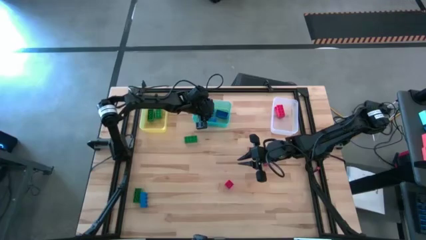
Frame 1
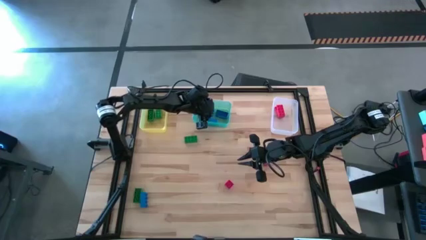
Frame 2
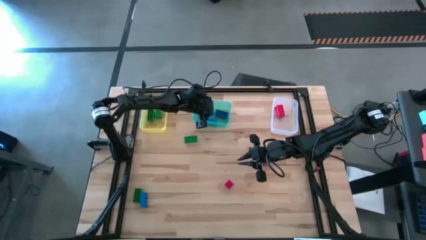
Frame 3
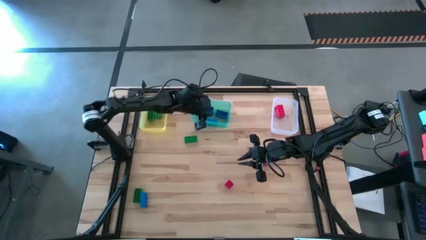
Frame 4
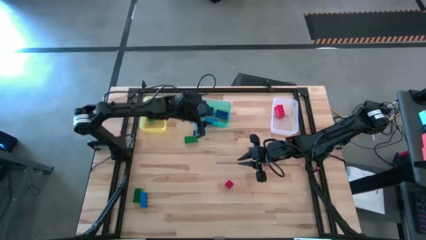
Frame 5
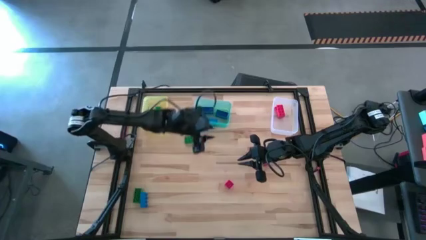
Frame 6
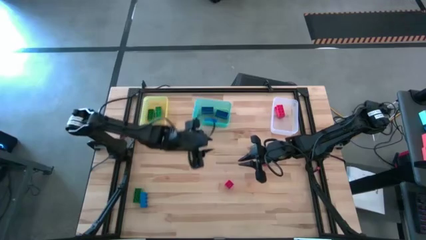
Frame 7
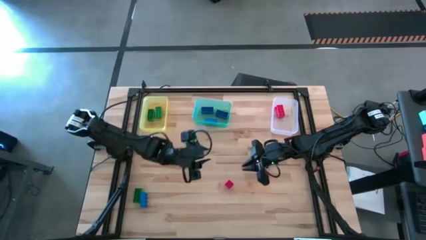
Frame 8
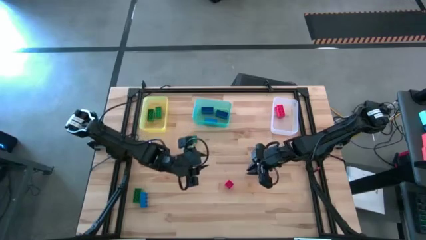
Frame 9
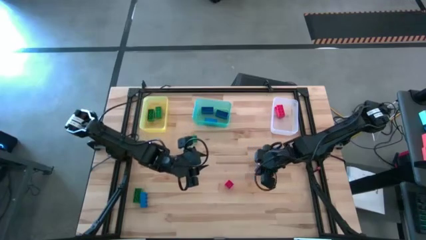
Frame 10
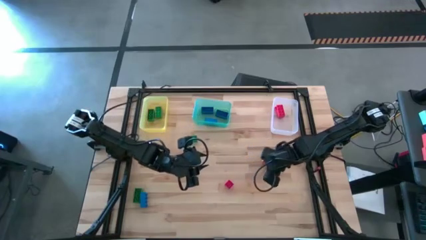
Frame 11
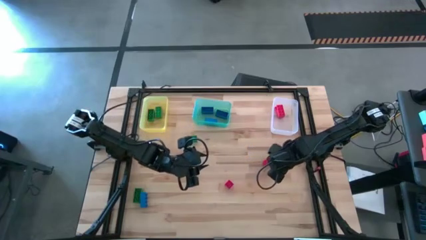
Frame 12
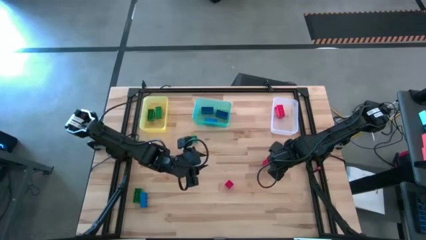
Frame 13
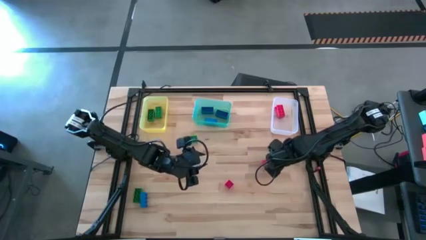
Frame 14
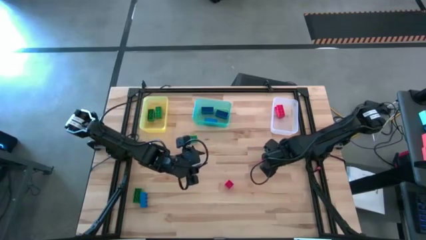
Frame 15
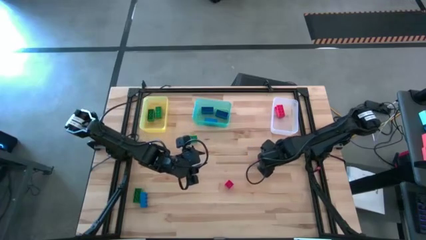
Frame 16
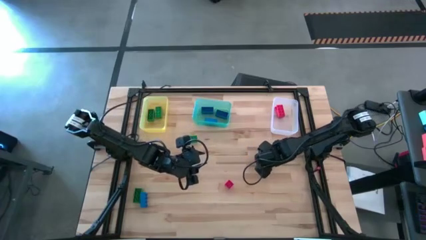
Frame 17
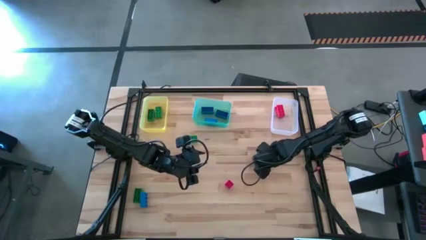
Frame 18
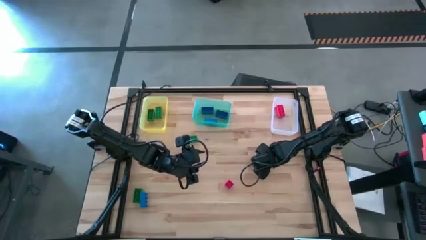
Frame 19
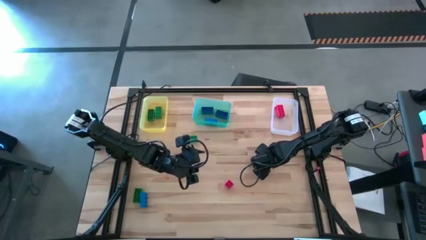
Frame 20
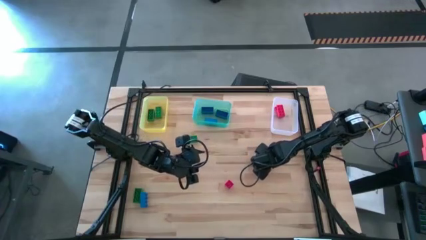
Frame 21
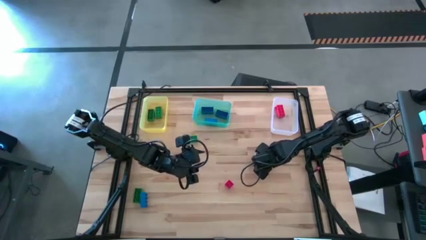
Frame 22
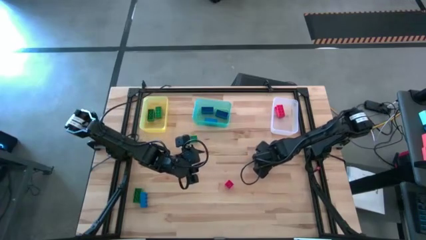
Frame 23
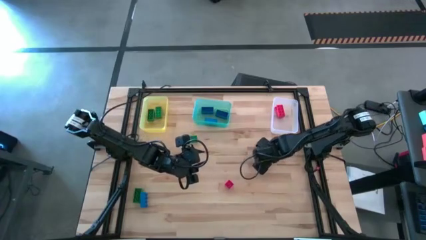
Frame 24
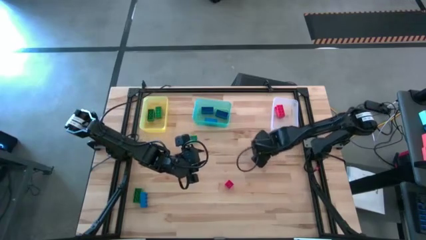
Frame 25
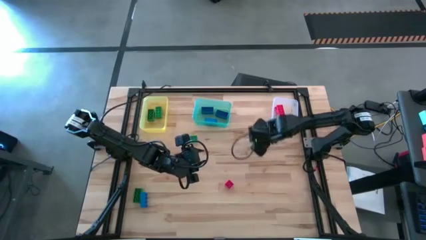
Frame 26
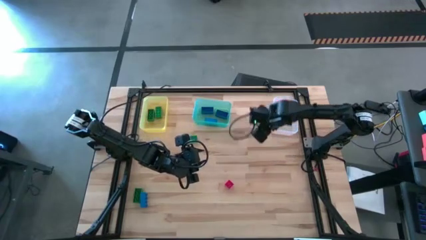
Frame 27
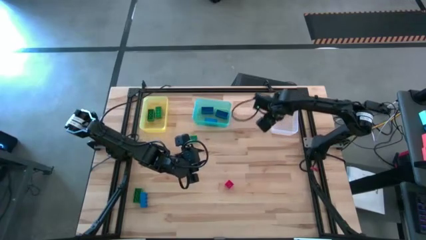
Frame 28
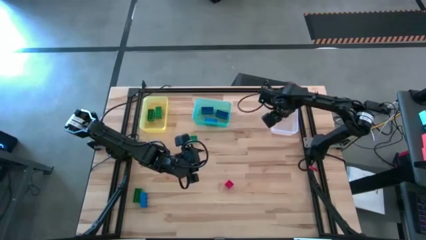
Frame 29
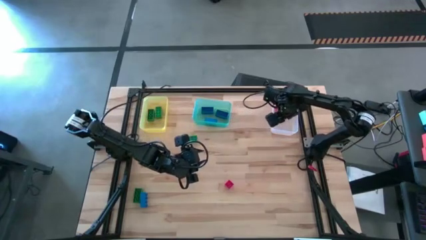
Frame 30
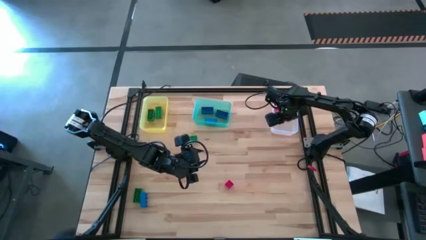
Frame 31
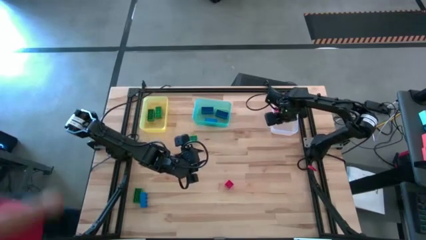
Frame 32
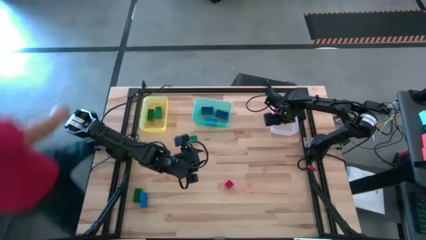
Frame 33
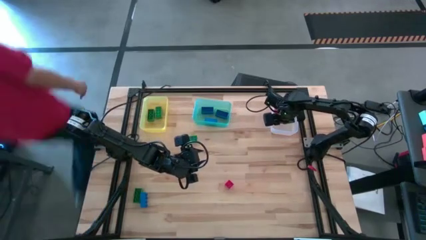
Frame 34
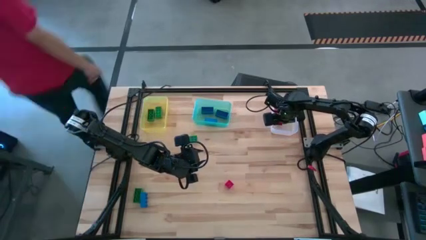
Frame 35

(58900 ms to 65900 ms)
Task: Sort & place blocks by color
Put the red game piece into the transparent bin

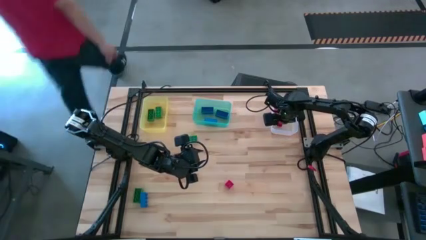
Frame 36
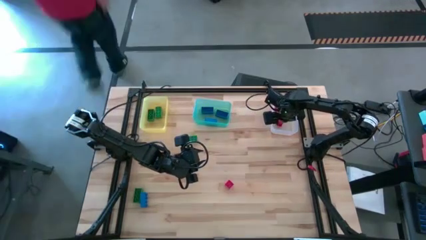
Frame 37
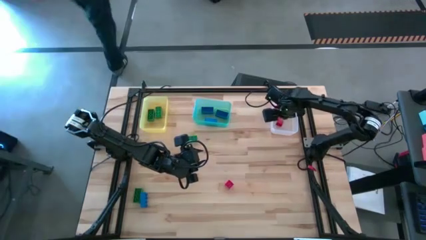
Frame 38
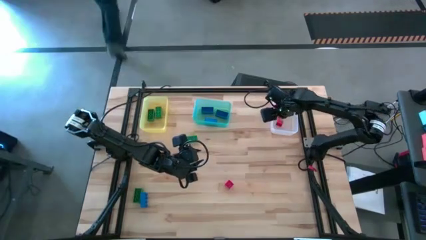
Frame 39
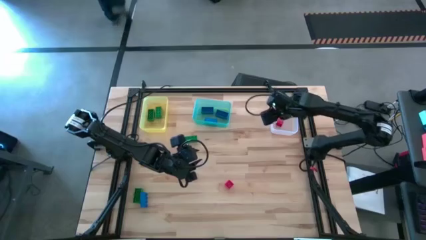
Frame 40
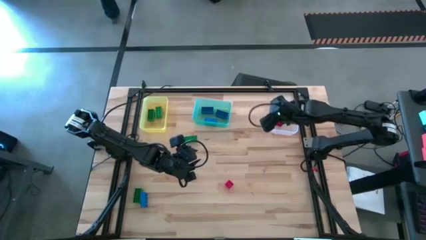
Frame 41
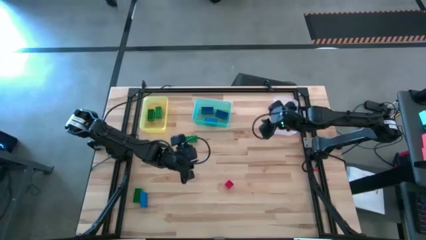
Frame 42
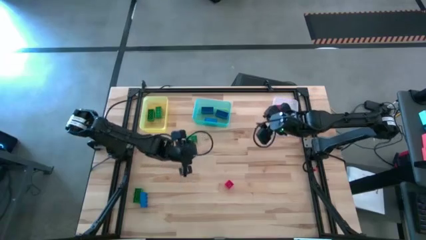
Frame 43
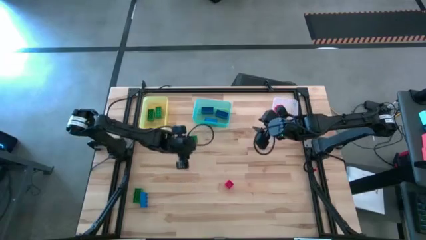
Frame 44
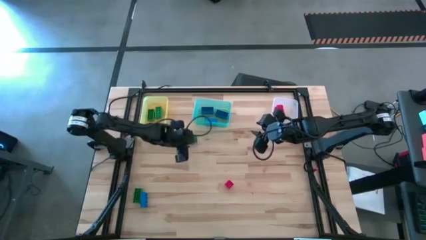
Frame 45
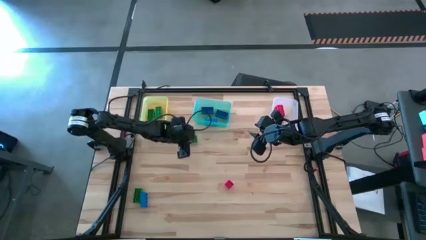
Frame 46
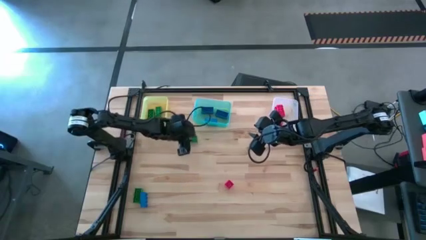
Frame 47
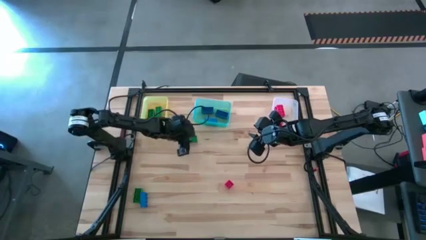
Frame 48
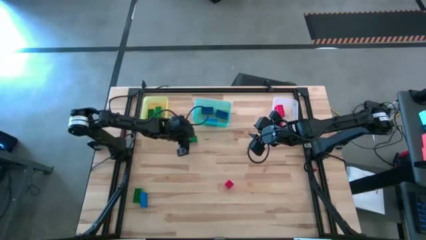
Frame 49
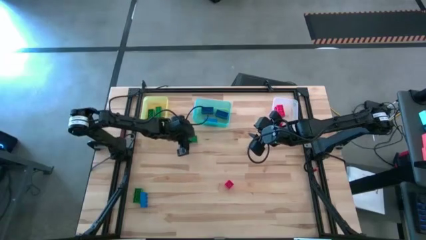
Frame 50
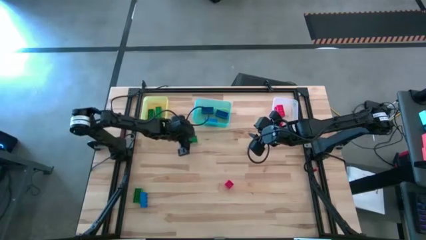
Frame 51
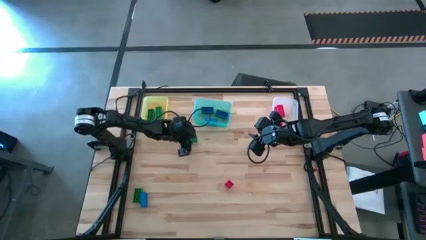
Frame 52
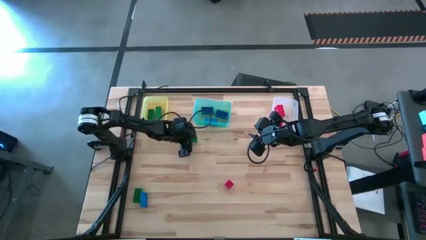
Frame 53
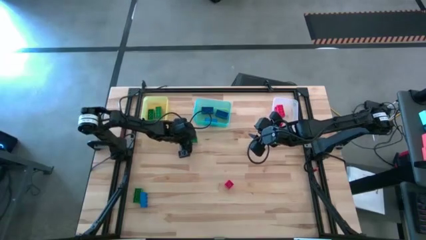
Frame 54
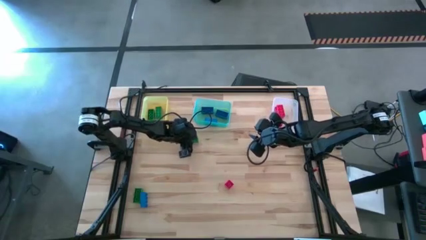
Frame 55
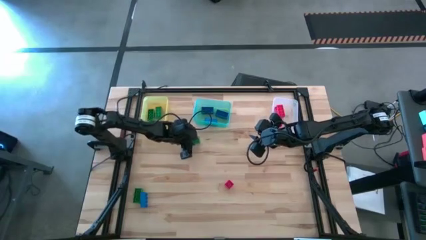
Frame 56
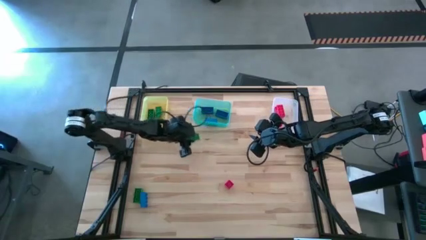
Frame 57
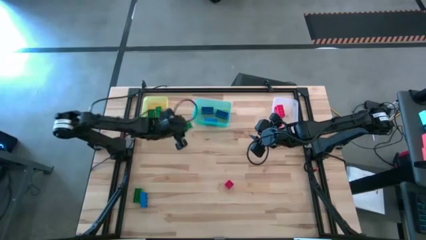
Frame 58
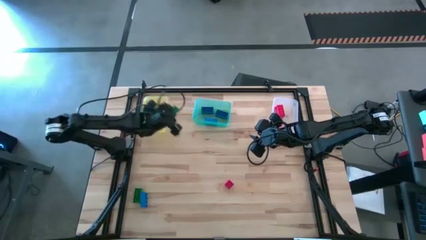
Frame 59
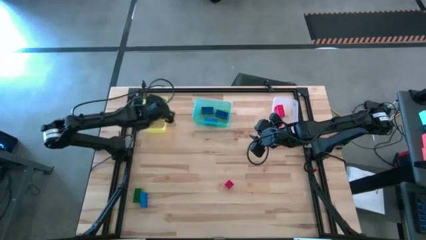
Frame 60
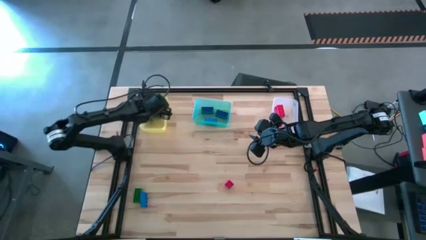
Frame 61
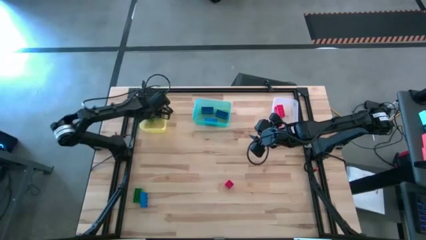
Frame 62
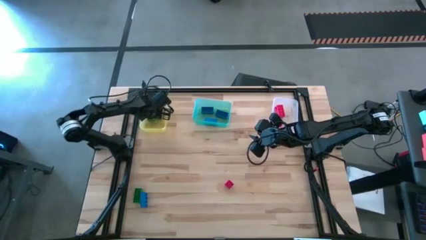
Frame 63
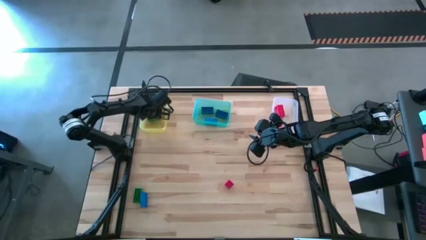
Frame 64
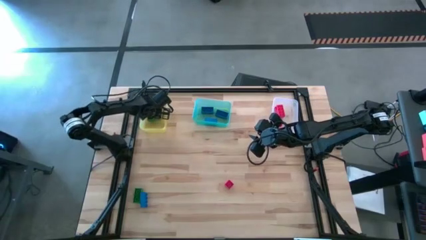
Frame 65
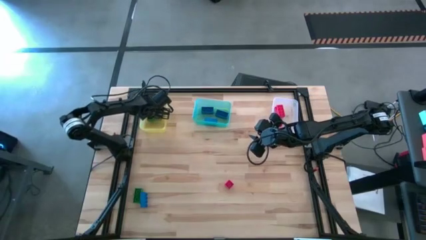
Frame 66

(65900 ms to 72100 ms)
Put the green game piece into the yellow bin

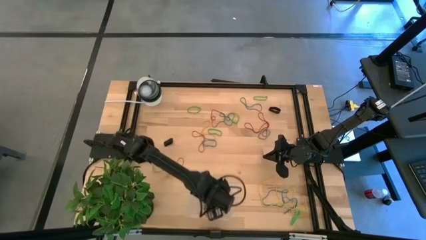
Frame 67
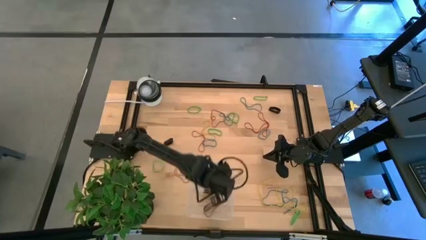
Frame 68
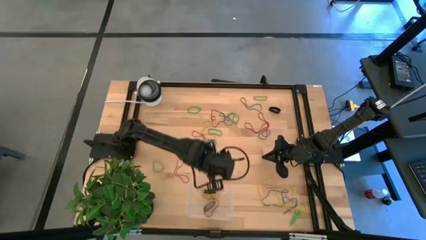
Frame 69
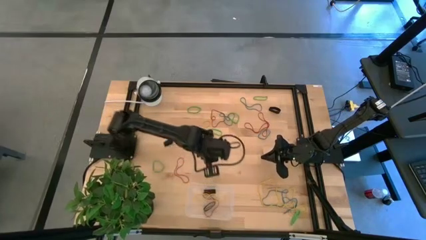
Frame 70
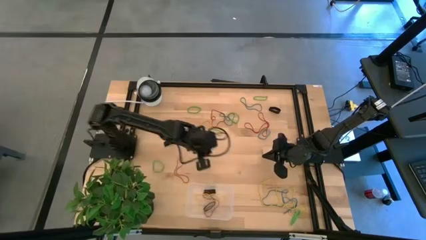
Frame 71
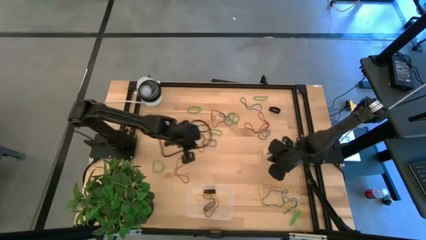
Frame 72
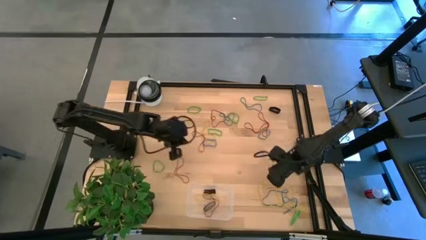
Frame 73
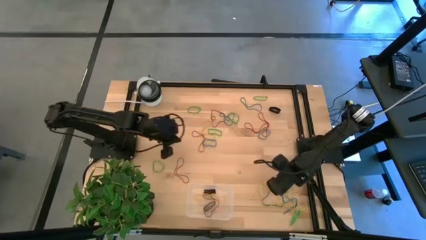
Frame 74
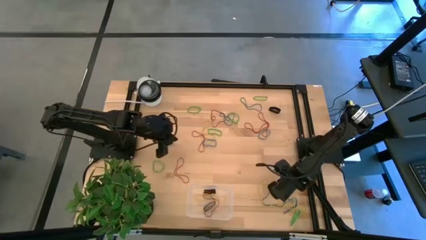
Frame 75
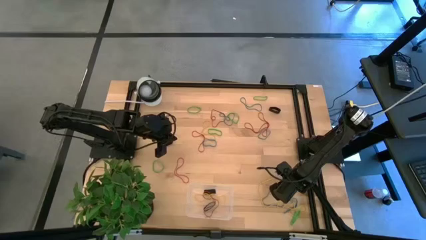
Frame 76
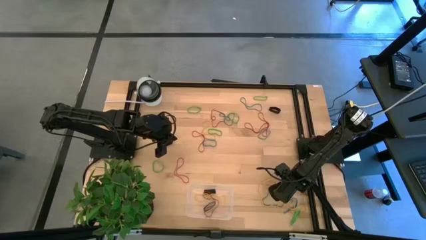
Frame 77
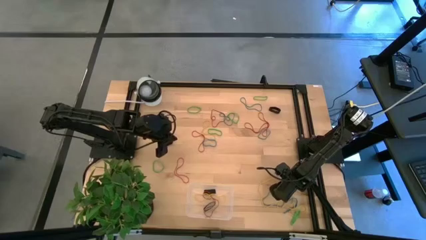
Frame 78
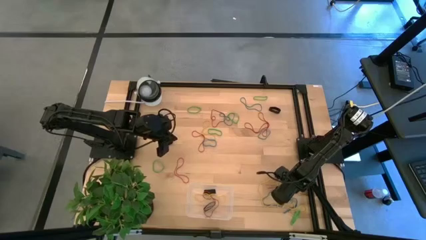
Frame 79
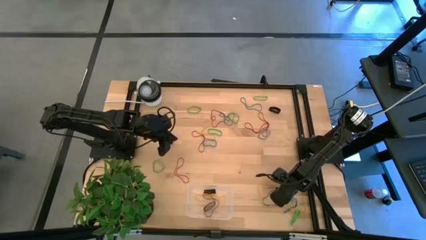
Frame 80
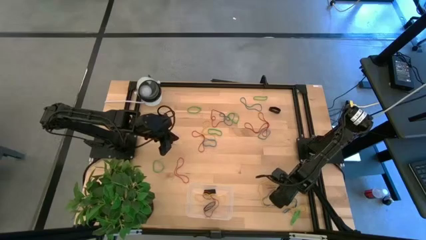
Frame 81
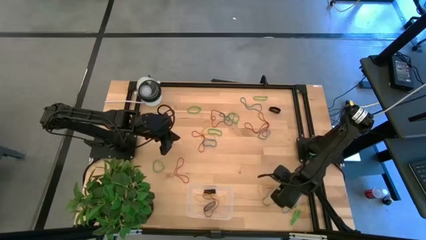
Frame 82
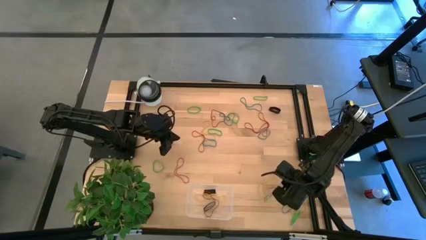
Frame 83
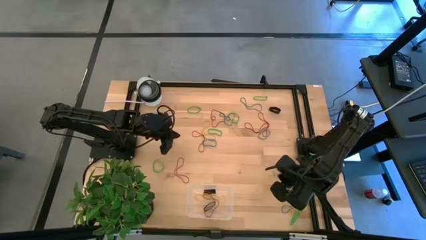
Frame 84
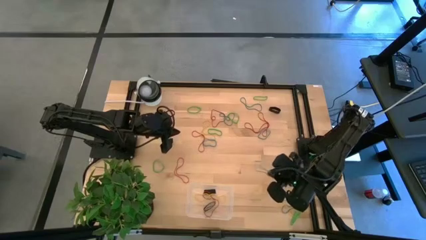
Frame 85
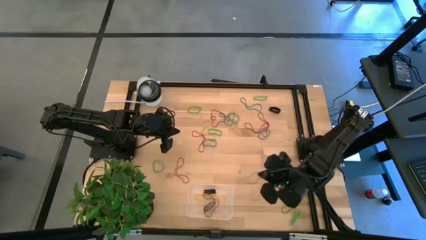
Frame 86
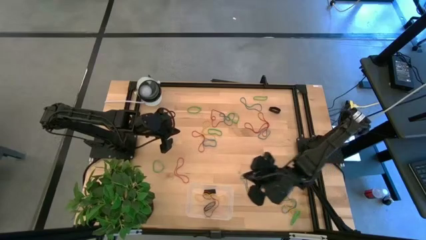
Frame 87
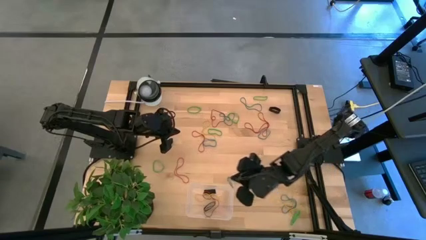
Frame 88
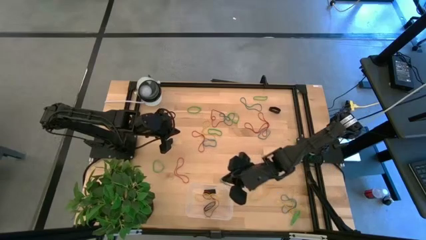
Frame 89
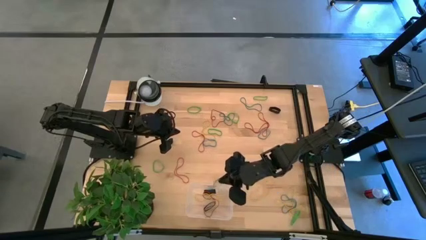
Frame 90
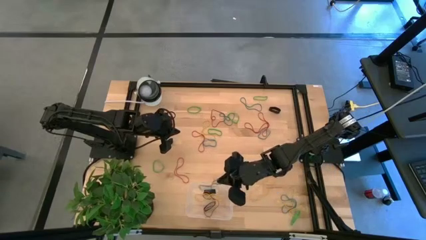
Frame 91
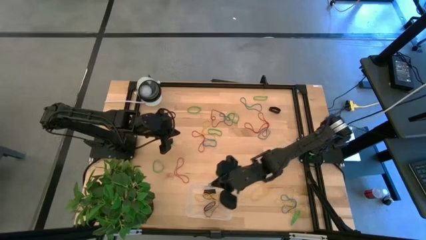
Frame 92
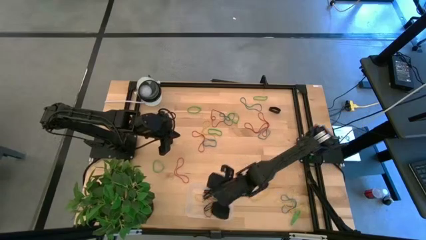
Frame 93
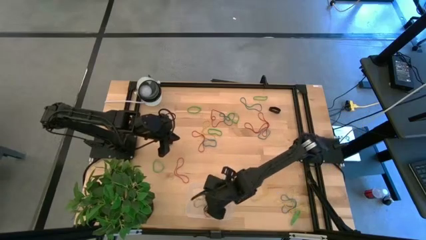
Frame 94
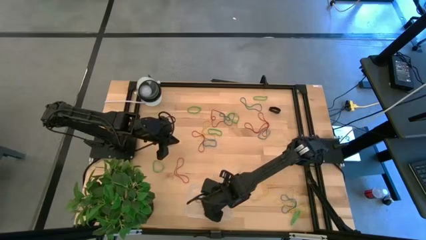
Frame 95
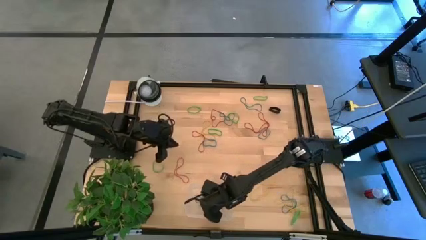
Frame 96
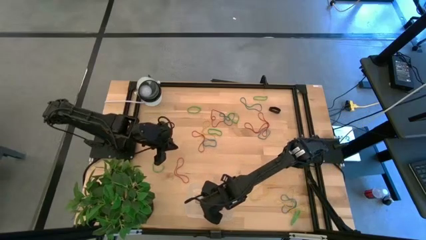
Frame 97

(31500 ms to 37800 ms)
Task: Pick and place rubber bands into bin
Put the blue rubber band into the transparent bin
